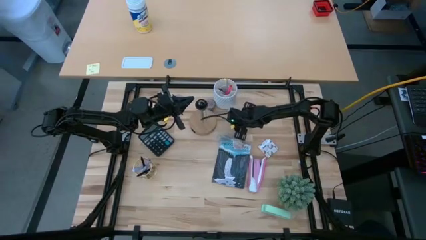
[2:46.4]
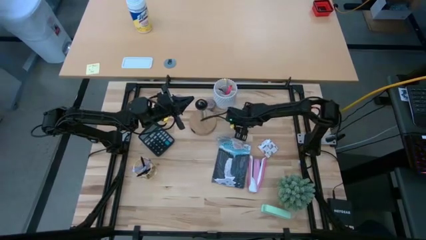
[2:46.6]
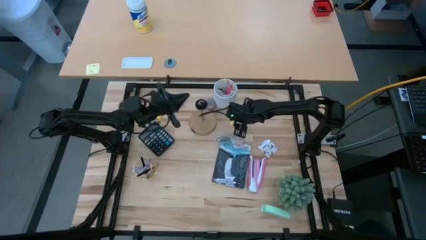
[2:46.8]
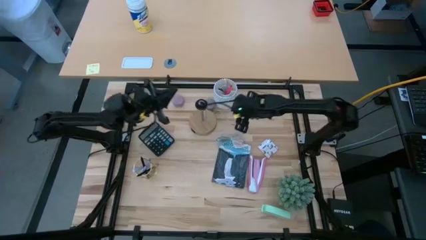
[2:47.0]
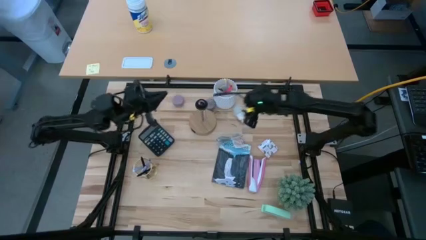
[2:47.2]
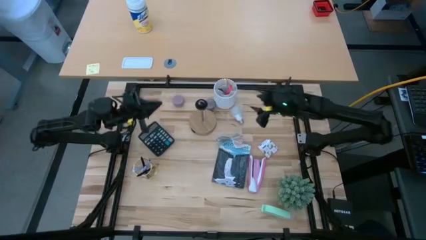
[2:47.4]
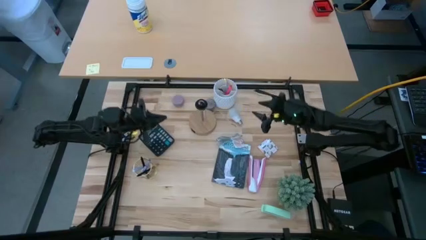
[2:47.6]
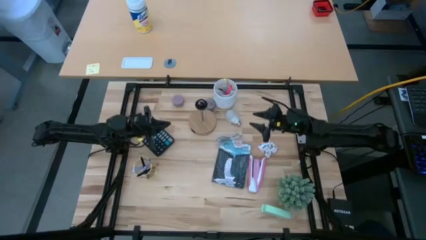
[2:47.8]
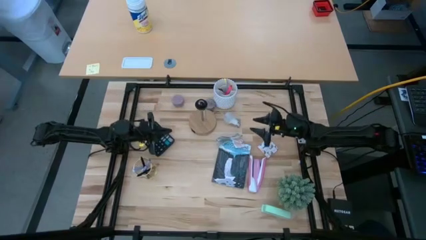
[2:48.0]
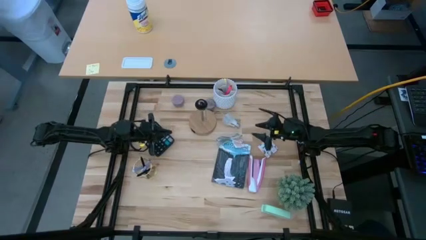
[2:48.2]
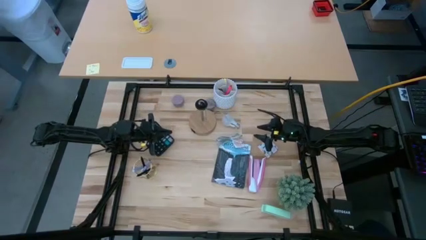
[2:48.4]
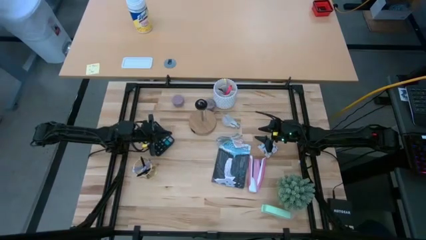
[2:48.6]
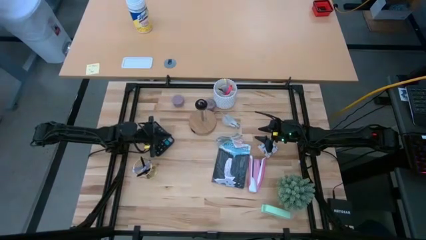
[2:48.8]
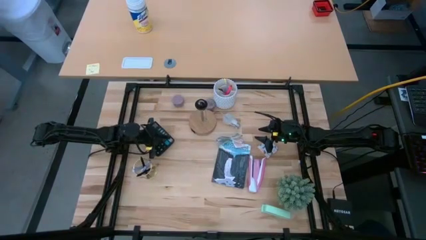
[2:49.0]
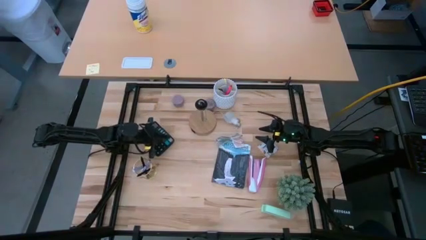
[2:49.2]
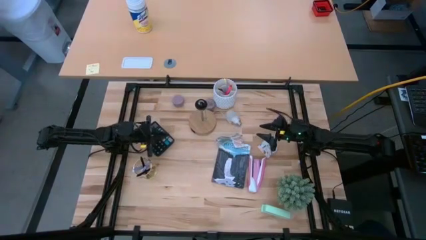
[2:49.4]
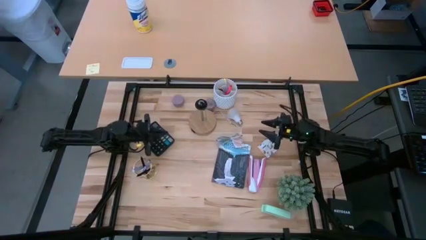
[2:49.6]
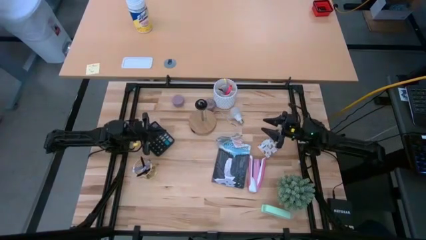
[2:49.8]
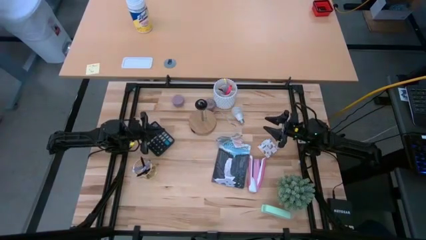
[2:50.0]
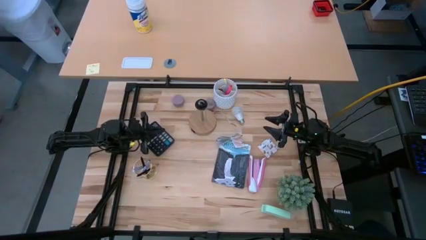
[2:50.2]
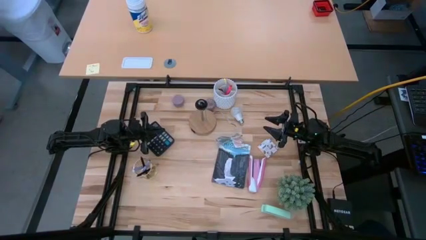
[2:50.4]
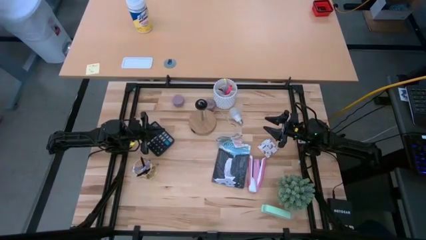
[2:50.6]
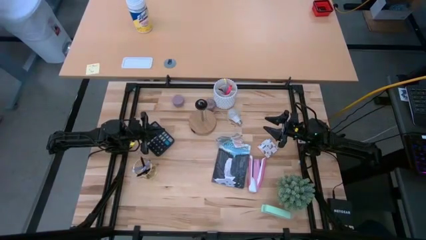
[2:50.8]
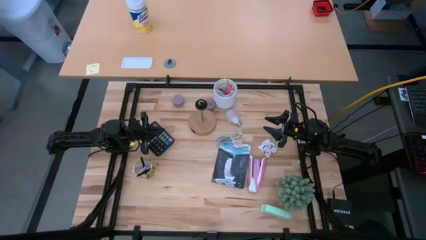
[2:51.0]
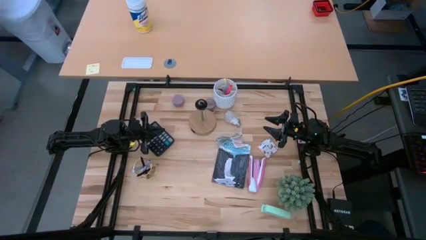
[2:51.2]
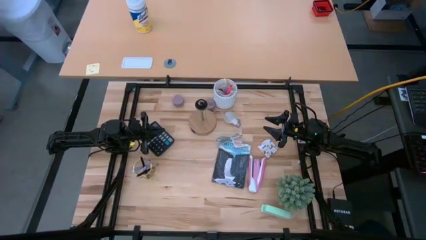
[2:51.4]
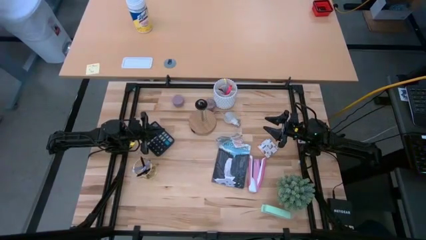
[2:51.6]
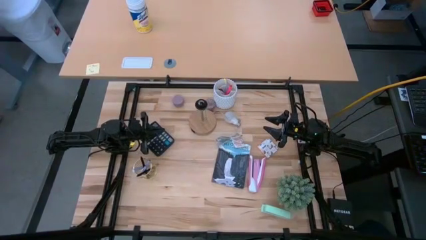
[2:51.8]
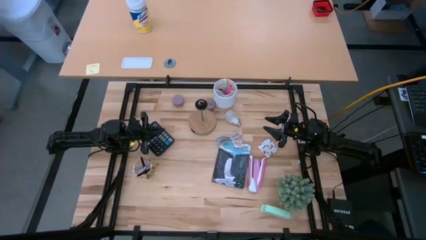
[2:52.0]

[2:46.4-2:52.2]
Task: Screw lightbulb
Return to Home Position
